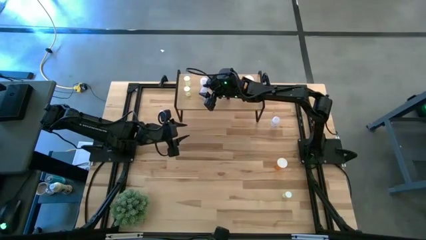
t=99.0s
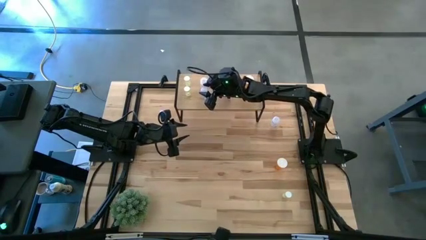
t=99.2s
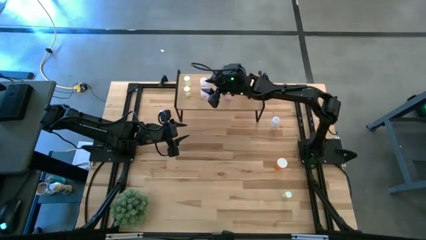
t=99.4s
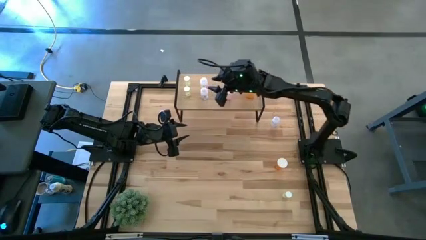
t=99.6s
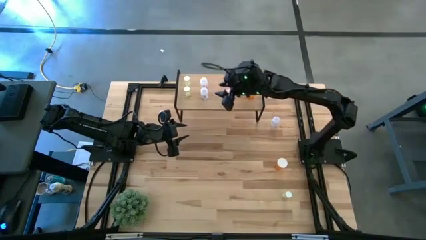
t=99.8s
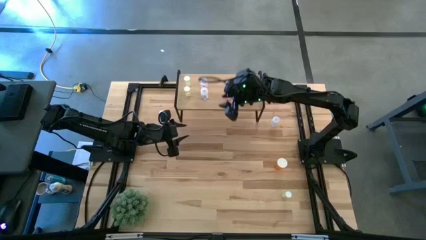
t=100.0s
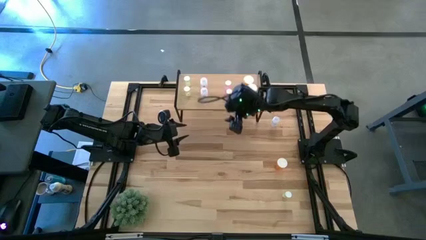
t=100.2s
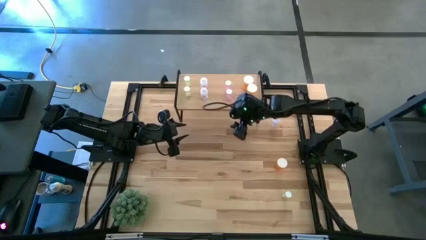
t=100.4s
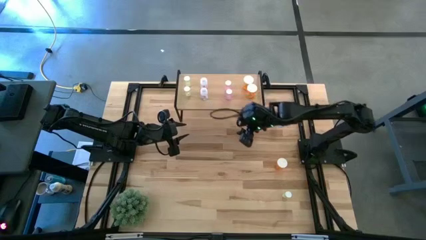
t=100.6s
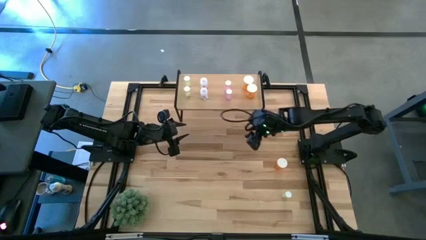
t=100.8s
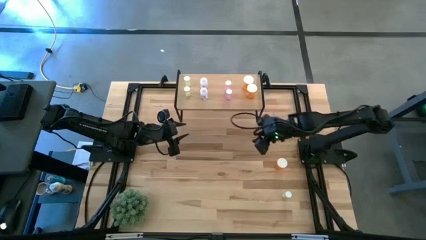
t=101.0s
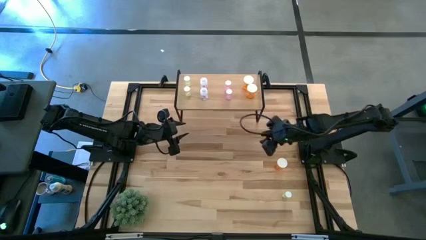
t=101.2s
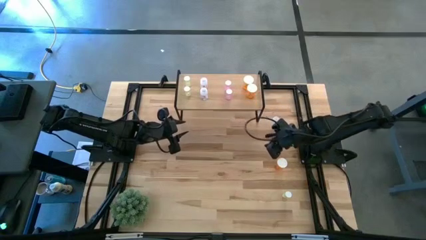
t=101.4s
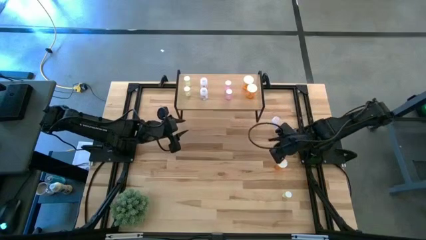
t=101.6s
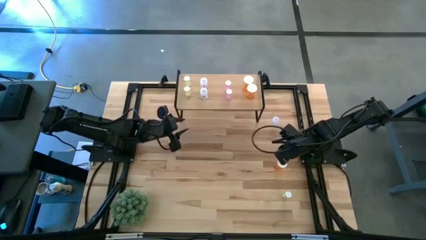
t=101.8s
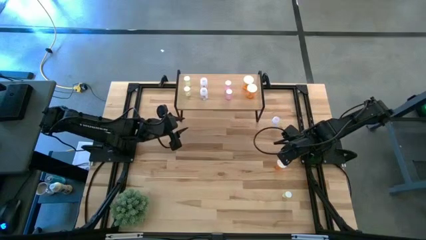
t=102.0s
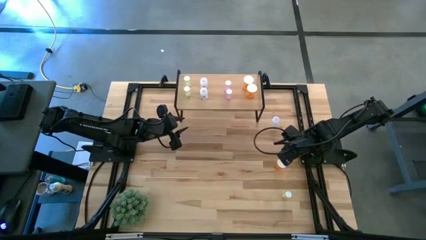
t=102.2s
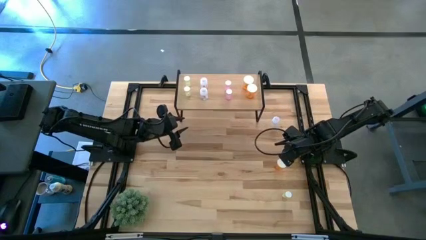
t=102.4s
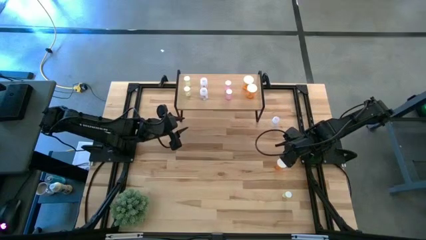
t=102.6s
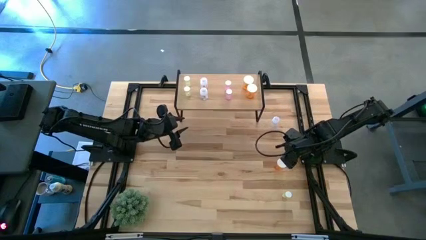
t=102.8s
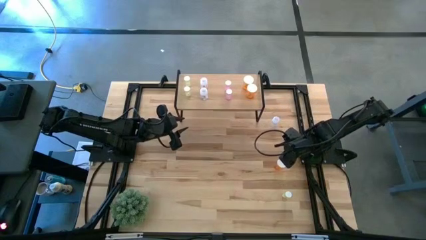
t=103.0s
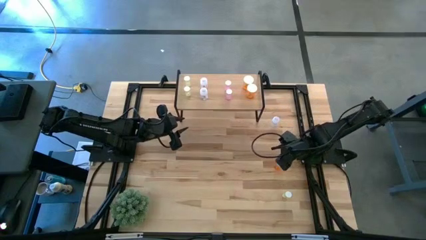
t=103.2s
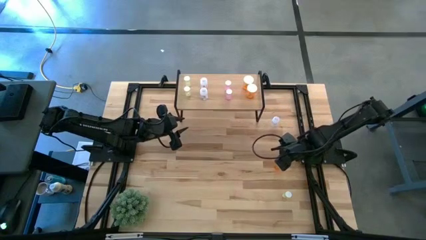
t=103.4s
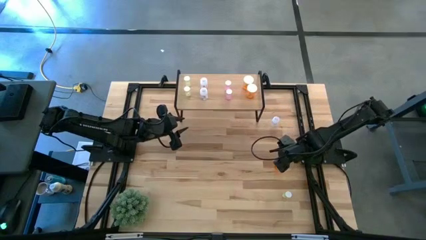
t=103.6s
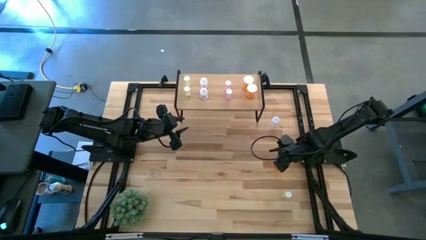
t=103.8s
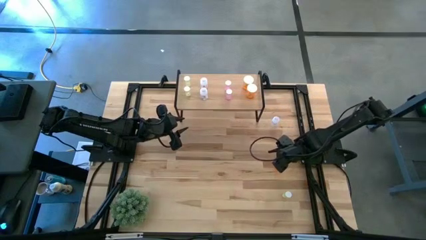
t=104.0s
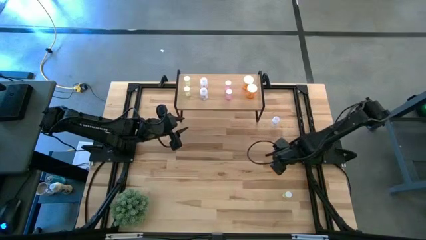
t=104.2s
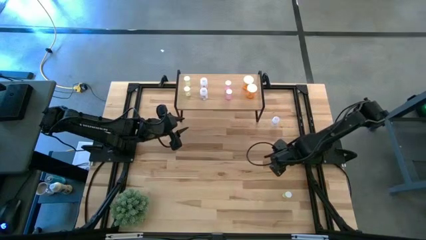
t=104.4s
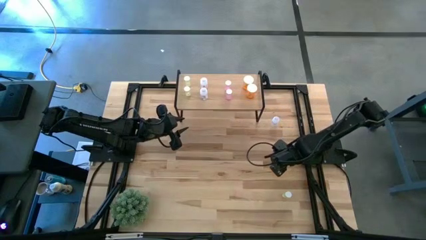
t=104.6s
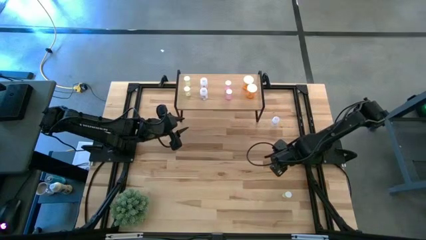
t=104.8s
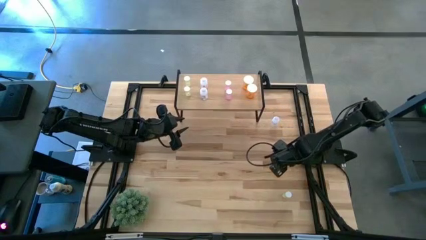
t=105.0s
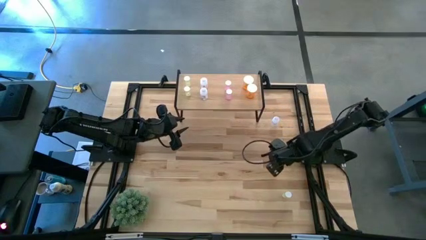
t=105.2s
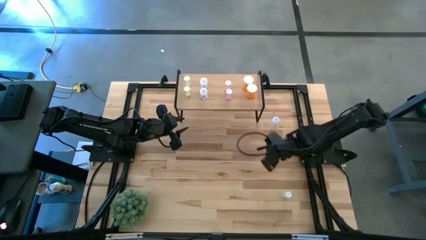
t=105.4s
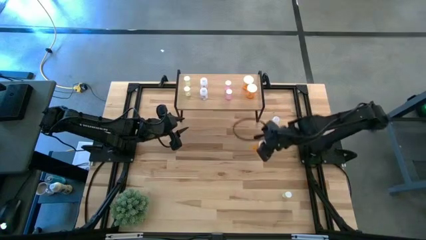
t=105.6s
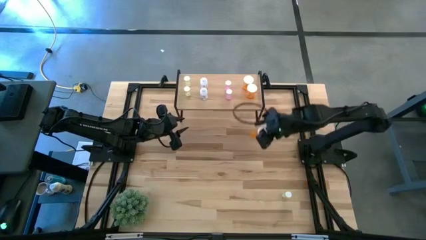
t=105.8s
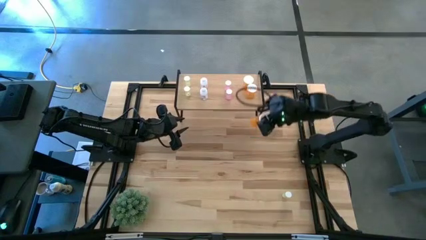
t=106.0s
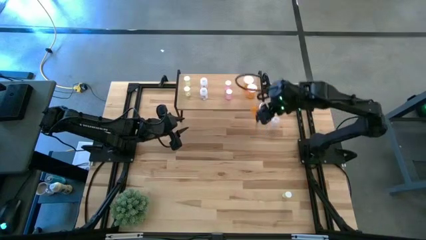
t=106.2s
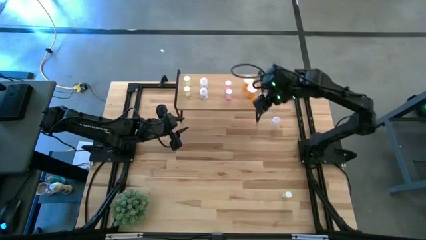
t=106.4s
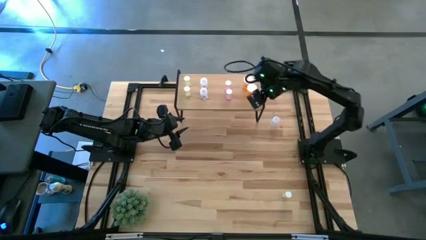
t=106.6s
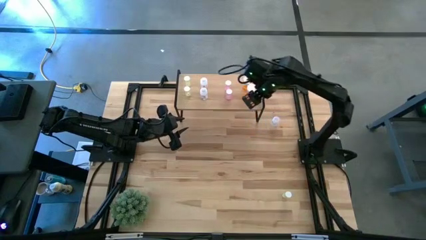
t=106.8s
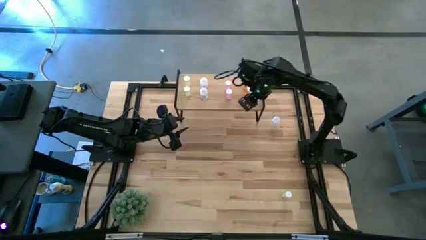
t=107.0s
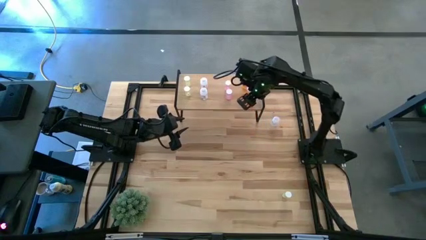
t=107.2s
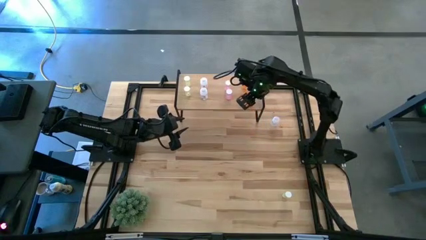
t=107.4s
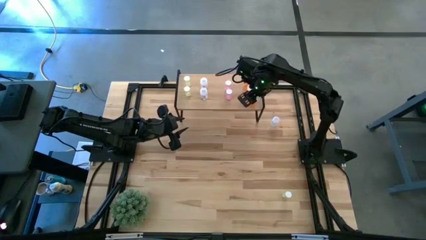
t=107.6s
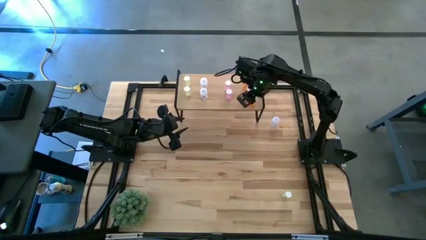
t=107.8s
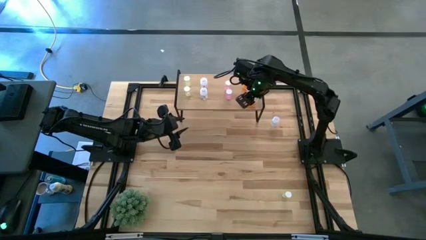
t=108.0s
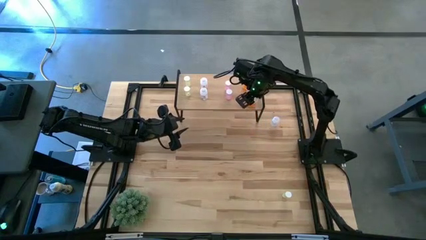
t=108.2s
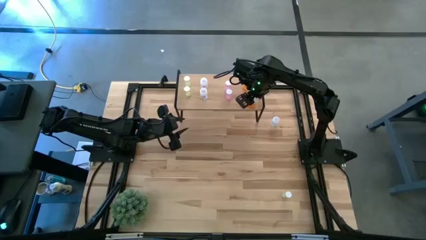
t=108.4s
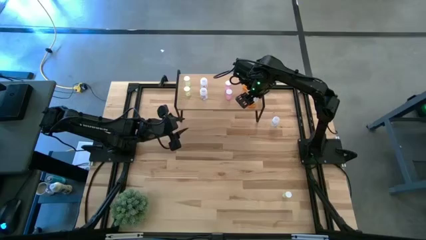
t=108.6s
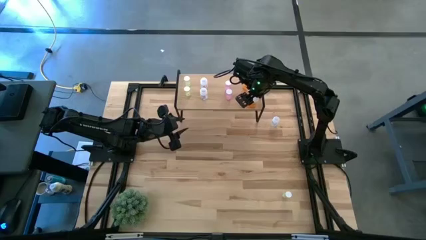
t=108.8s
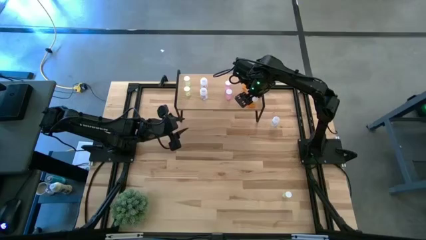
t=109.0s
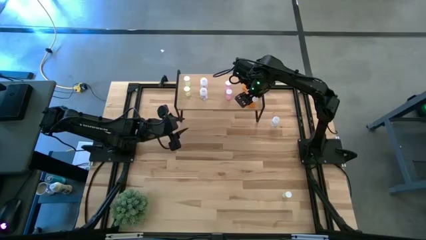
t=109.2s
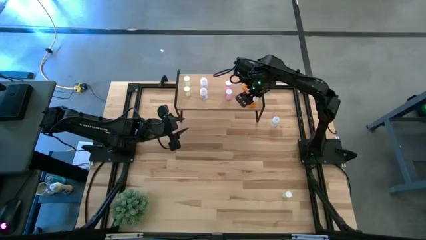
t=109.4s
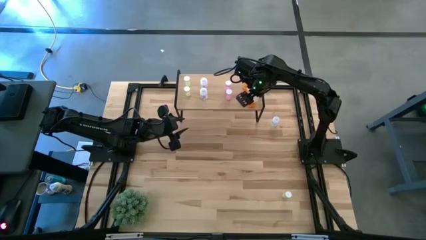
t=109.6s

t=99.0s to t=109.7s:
Task: Pick and place medicine bottles onto shelf by color
Put the orange pill bottle aligned with the other orange pill bottles on the shelf

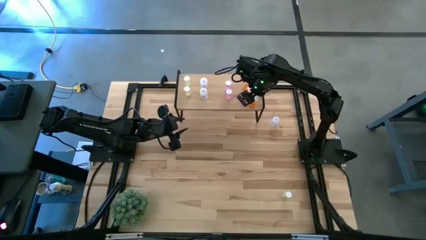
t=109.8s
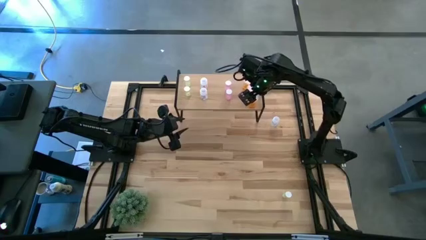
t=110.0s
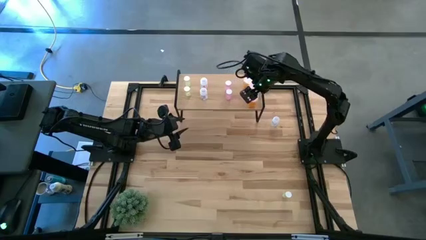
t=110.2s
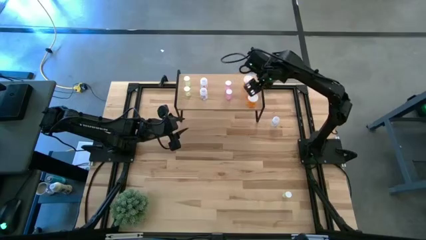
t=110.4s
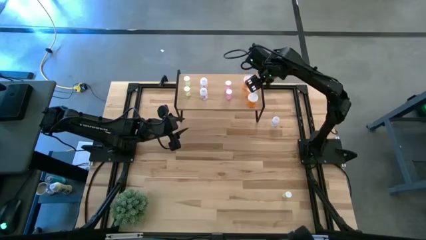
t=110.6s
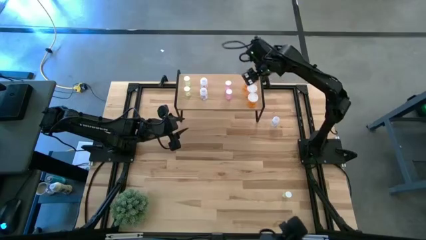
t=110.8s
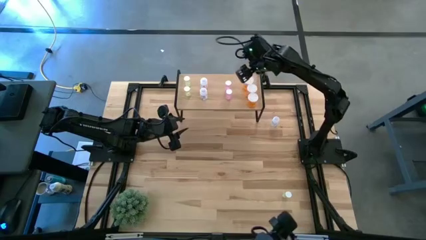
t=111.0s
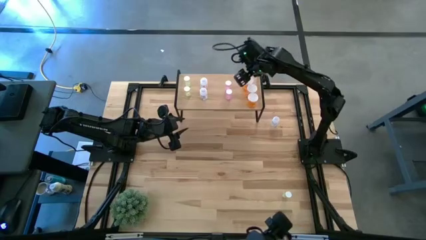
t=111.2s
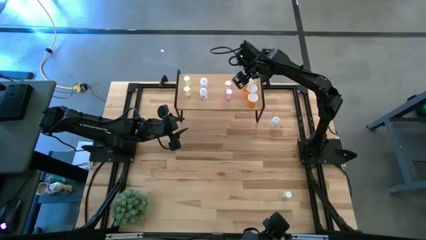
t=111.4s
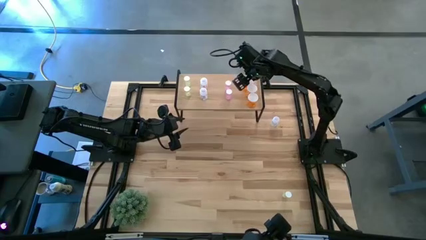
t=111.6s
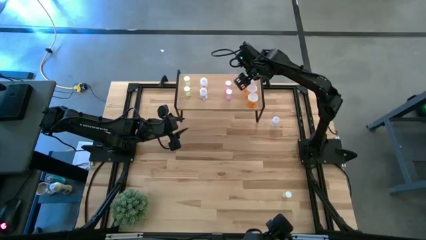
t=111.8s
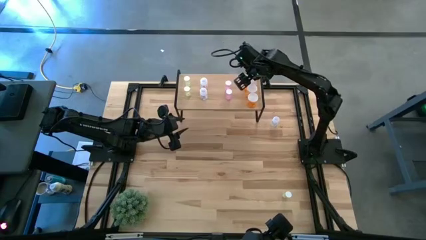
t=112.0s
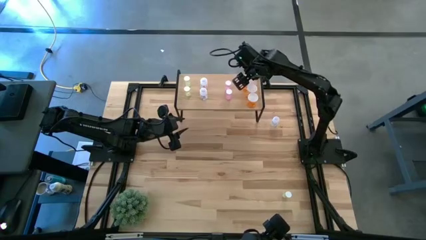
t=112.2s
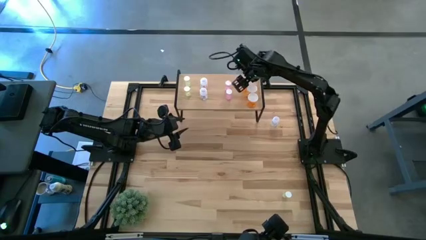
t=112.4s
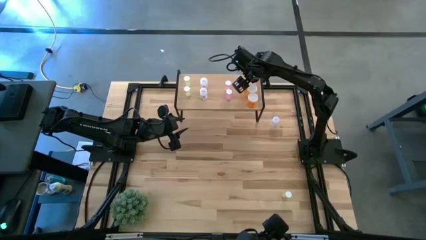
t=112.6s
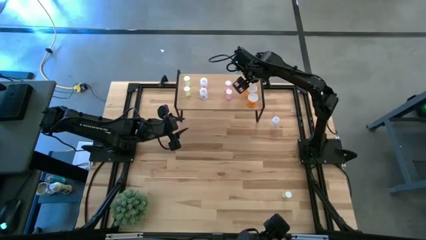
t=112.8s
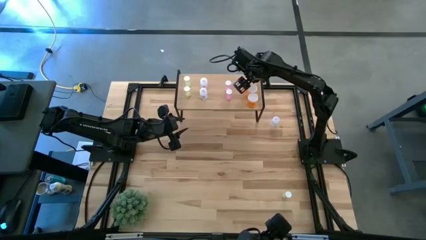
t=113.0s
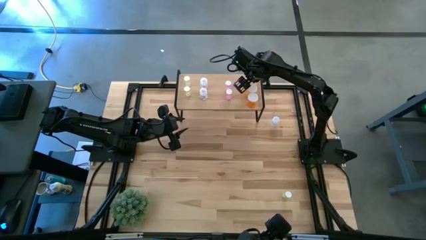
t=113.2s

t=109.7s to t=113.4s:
Adjust the top orange bottle on the shelf

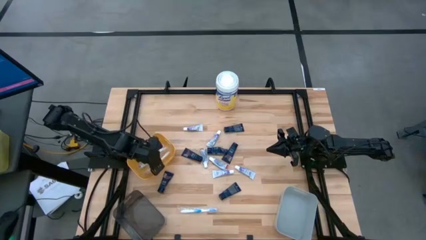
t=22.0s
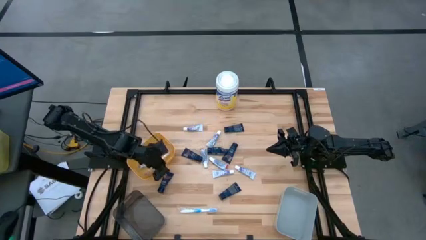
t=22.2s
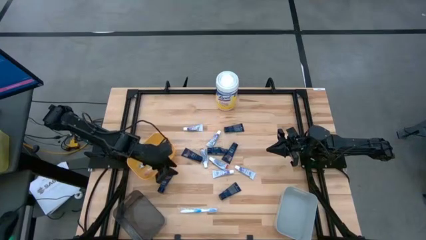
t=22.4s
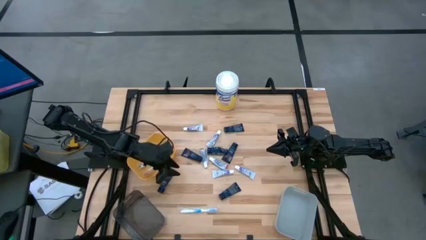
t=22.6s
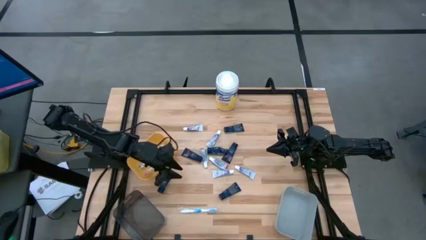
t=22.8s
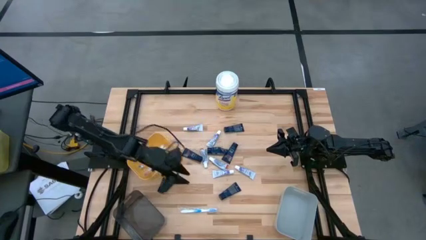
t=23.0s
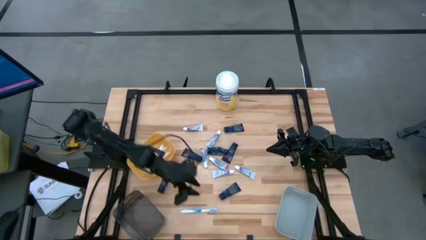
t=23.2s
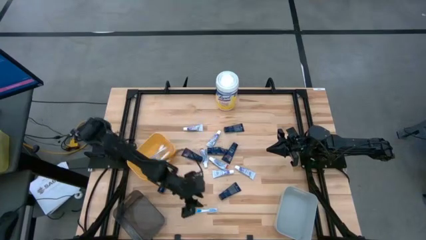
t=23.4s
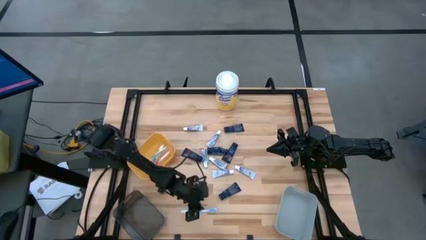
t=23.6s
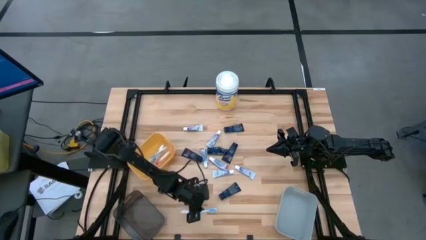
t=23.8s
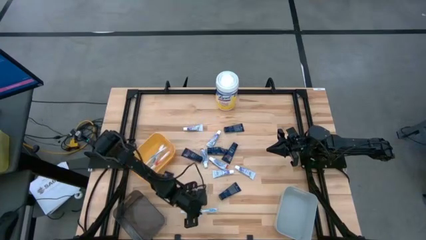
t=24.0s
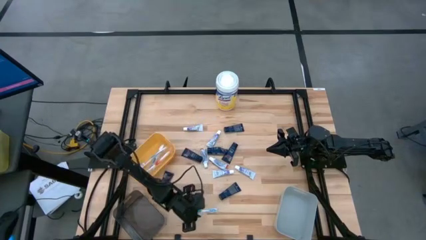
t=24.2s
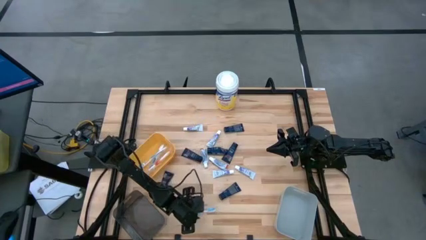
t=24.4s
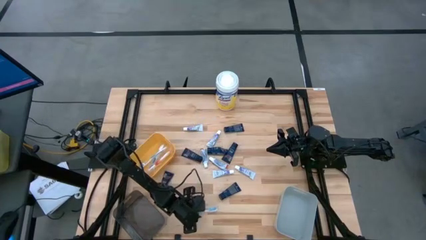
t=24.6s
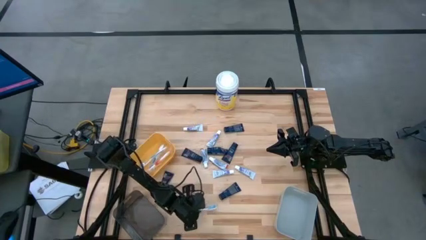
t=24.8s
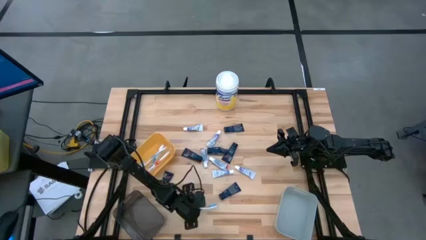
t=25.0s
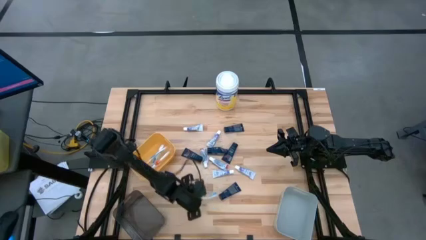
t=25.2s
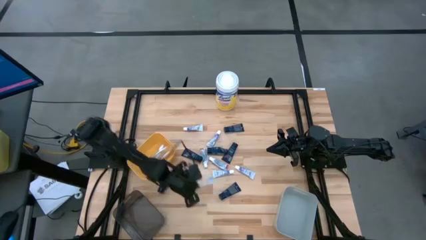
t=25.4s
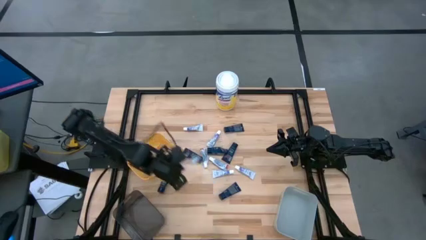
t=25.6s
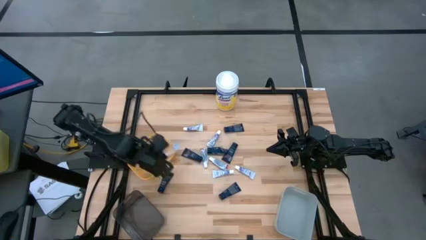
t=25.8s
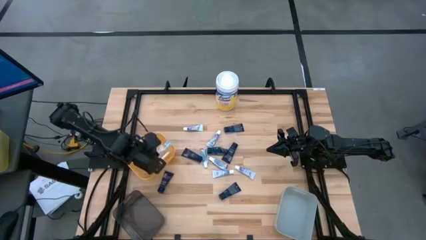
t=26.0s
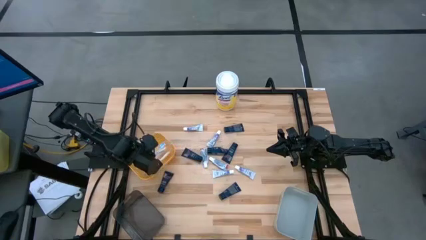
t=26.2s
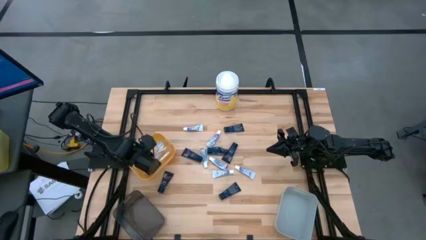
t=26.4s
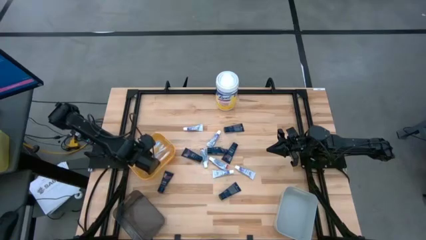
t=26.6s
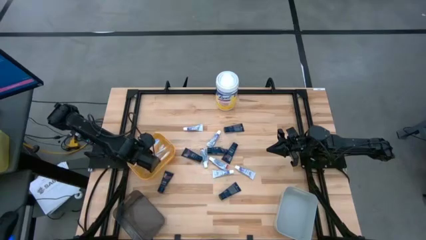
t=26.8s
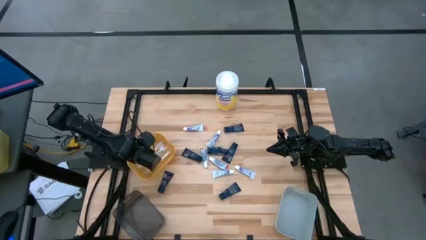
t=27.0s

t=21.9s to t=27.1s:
Task: Pick & Place Travel size toiletries
Put the blue toothbrush into the yellow bin
